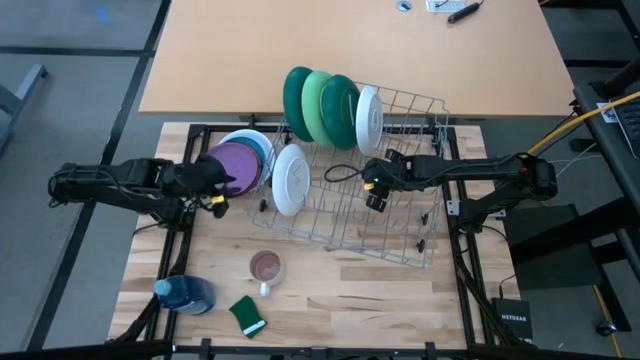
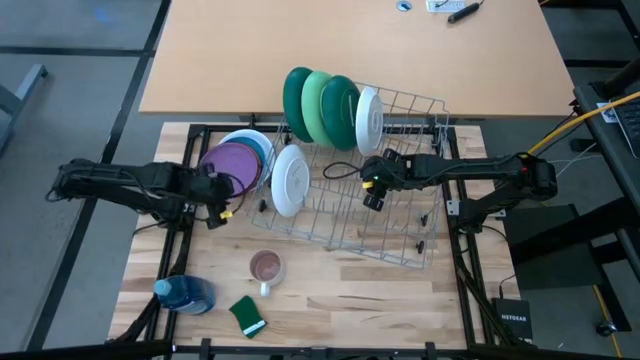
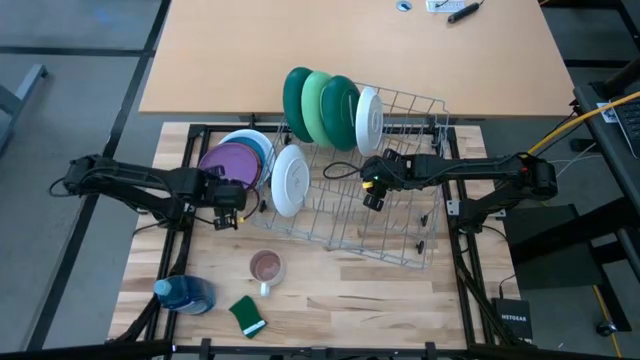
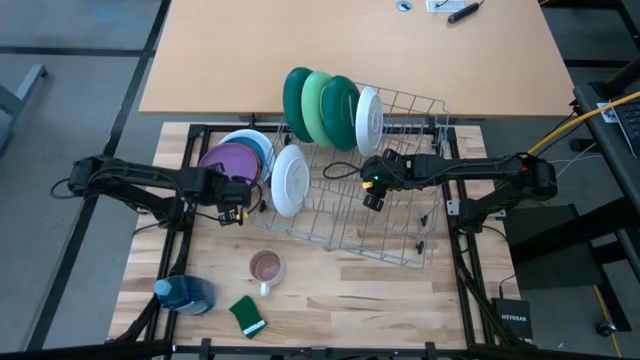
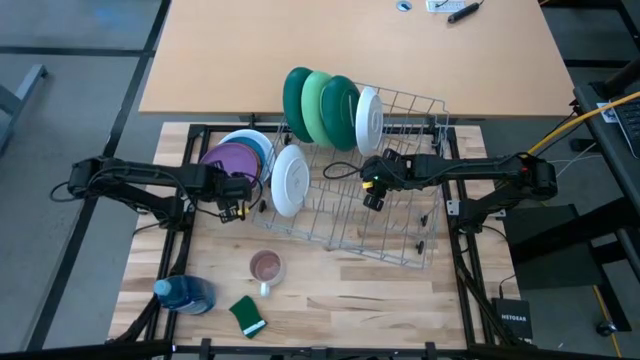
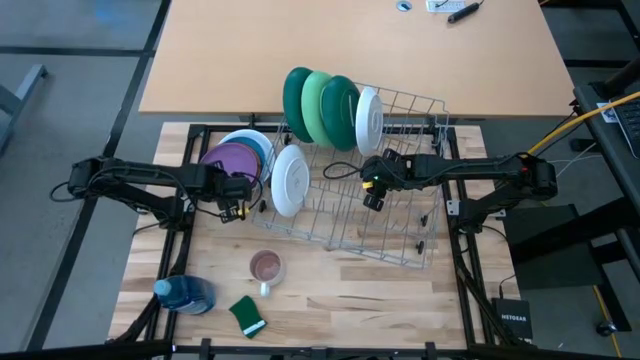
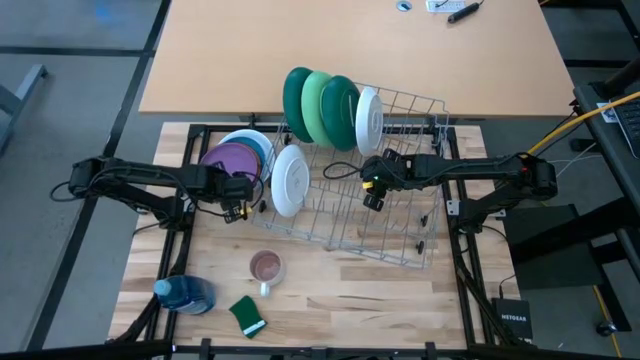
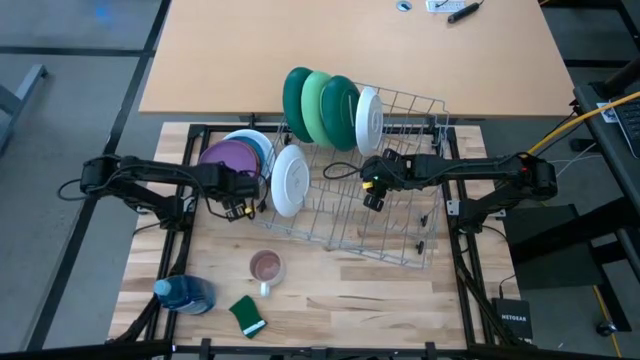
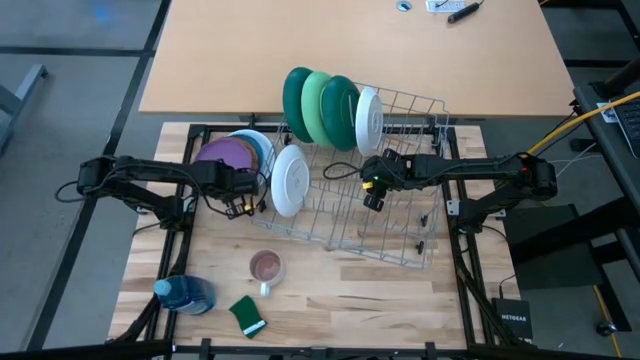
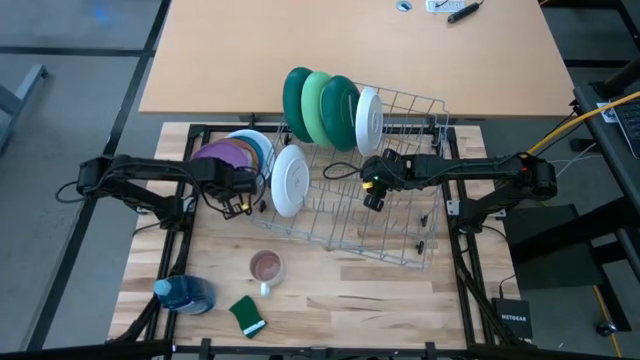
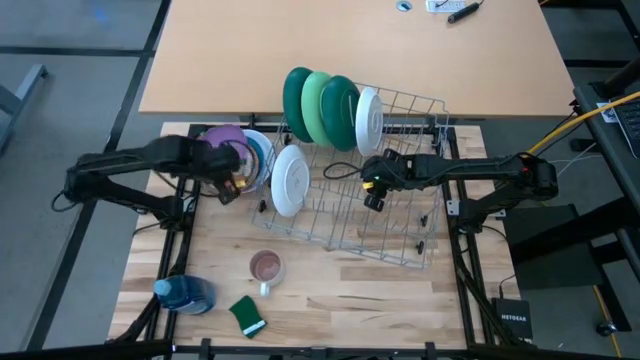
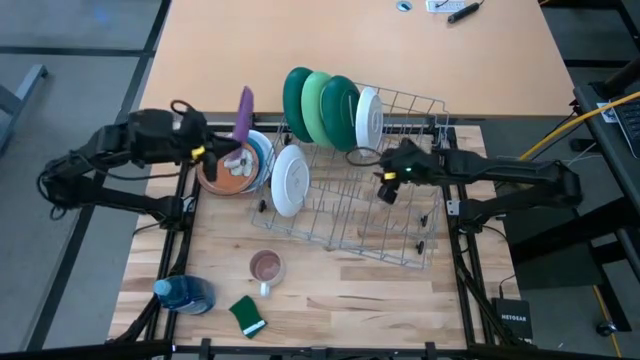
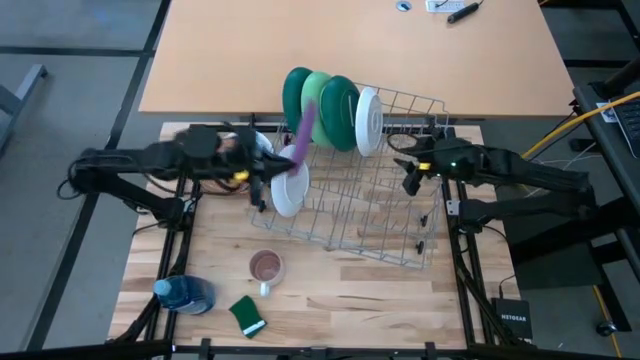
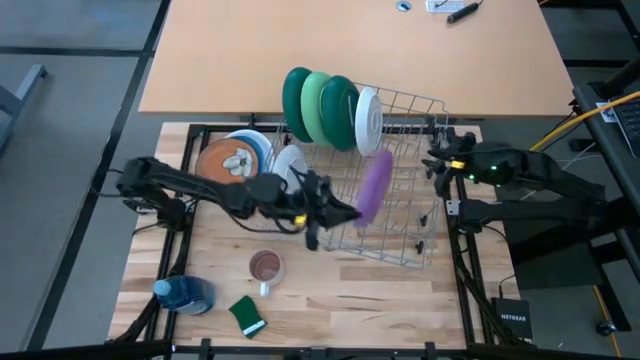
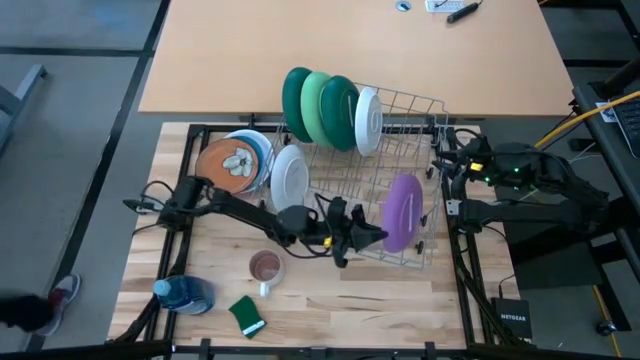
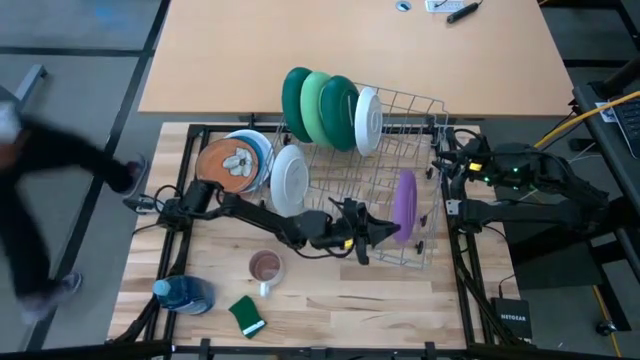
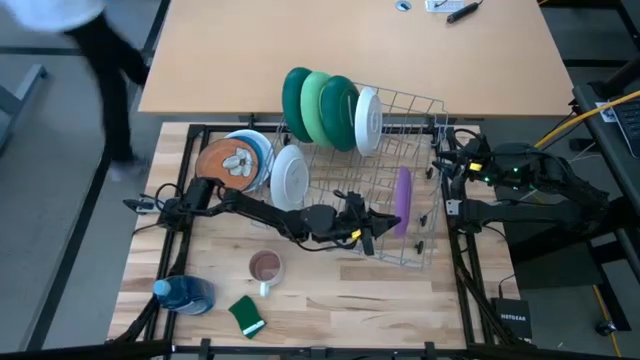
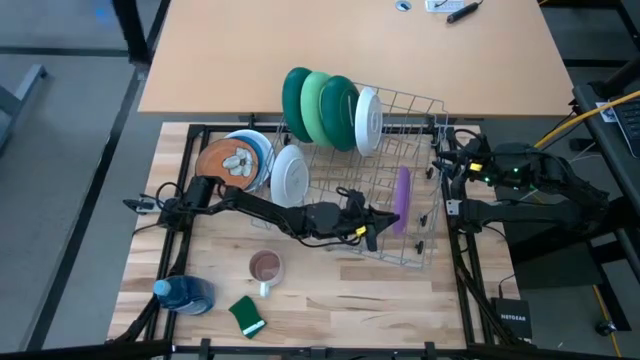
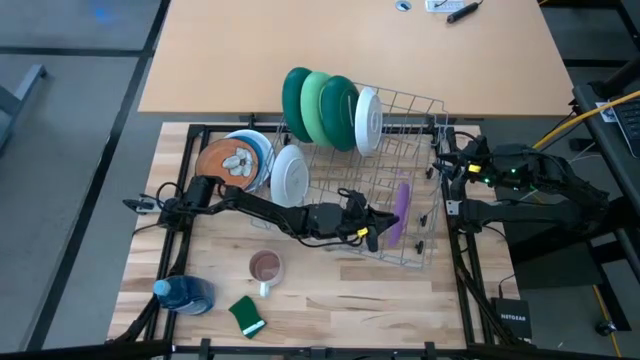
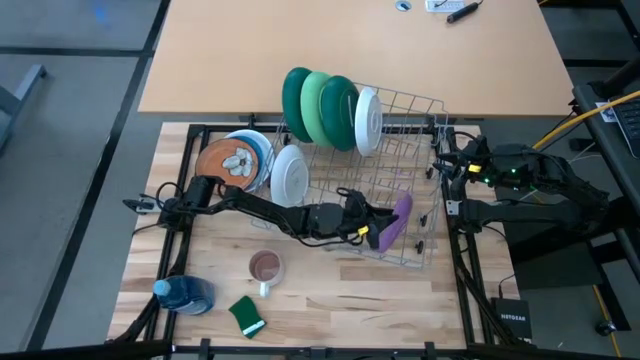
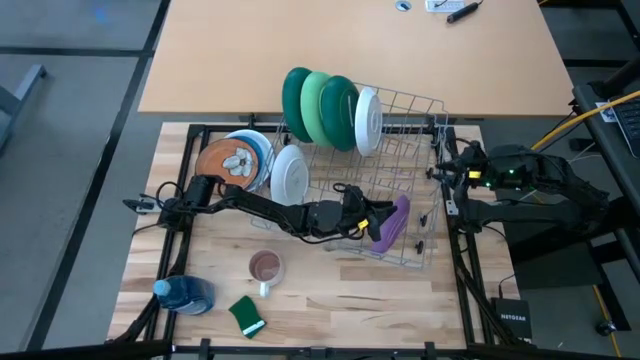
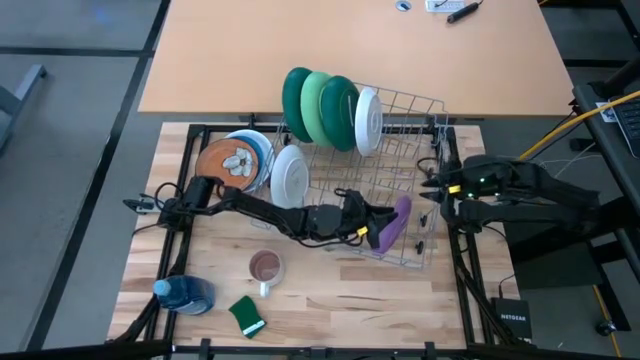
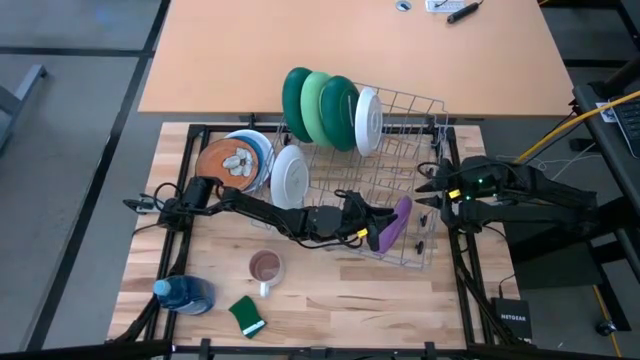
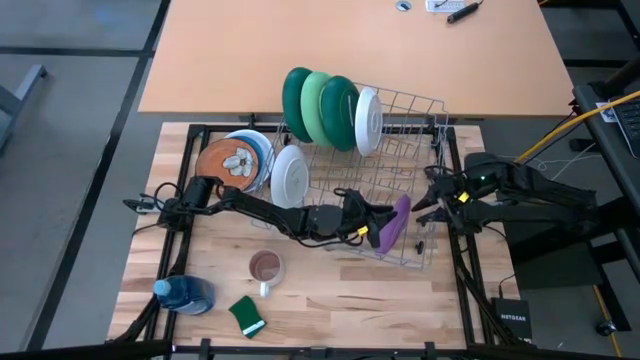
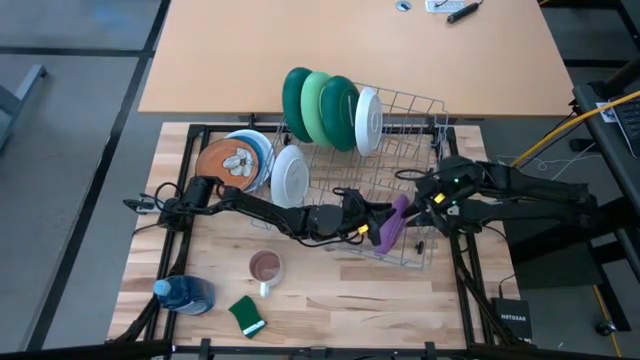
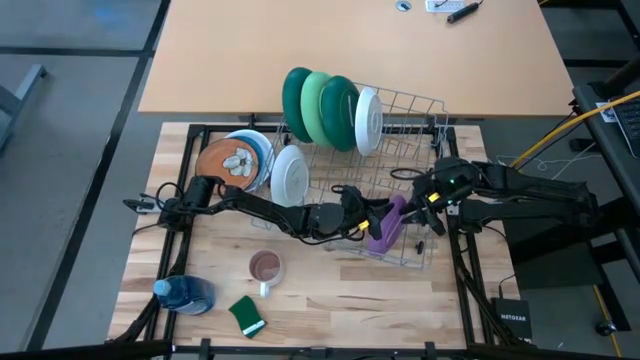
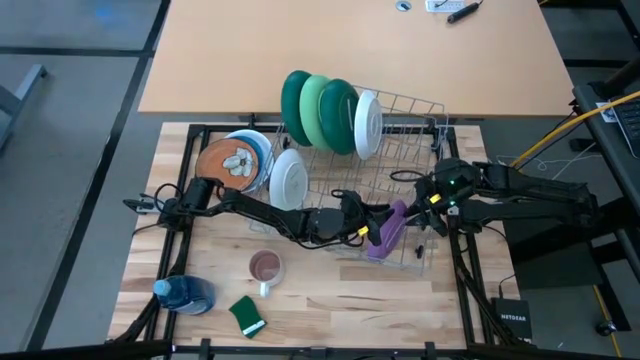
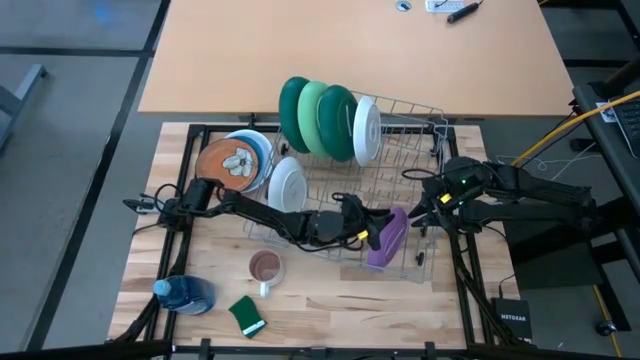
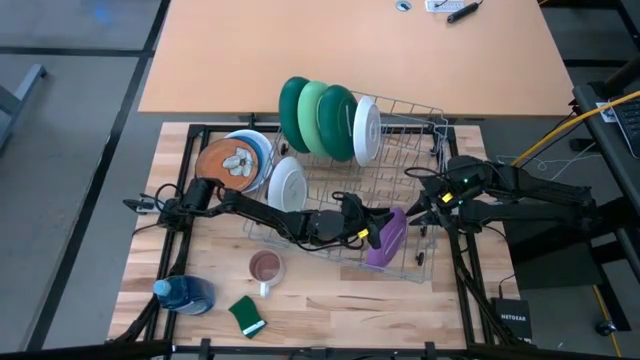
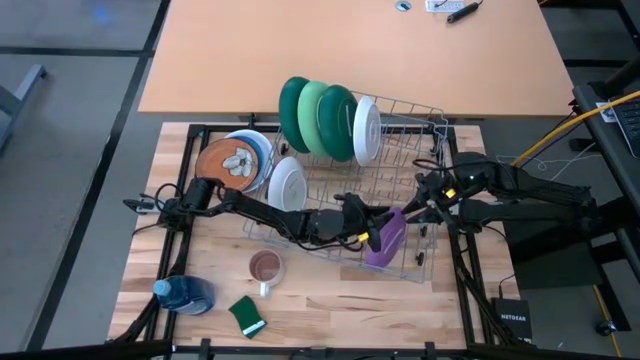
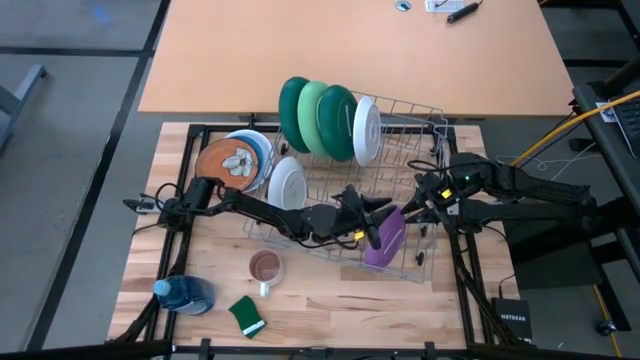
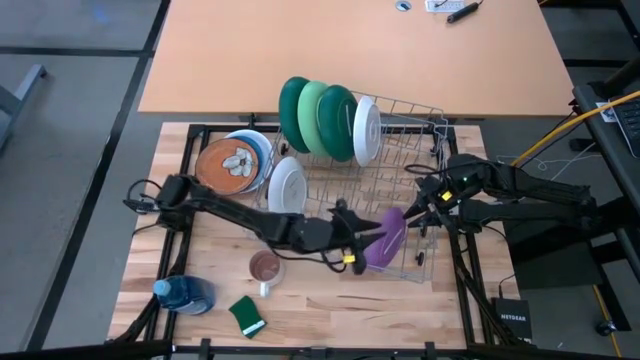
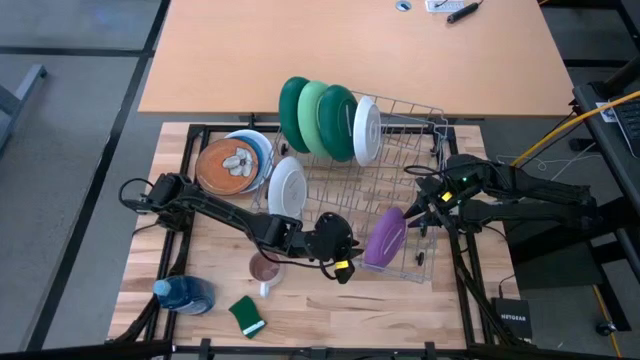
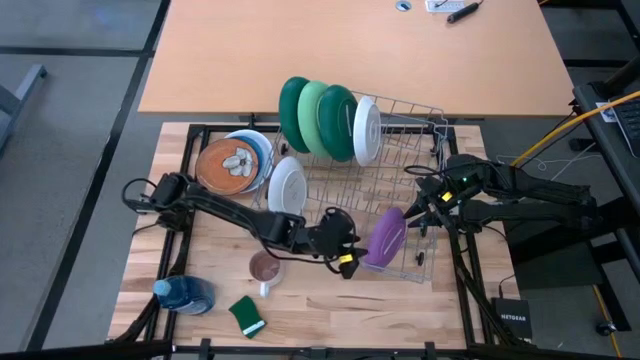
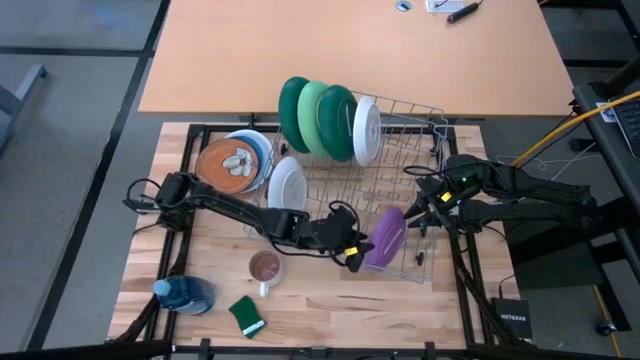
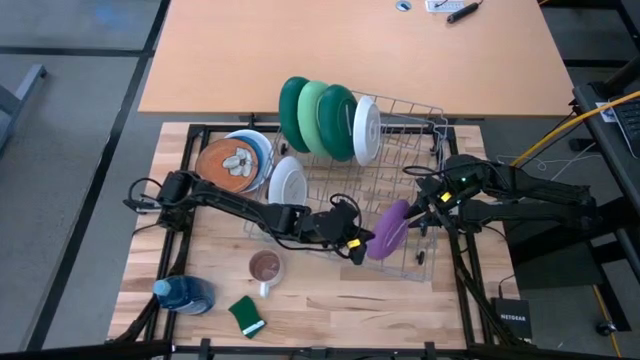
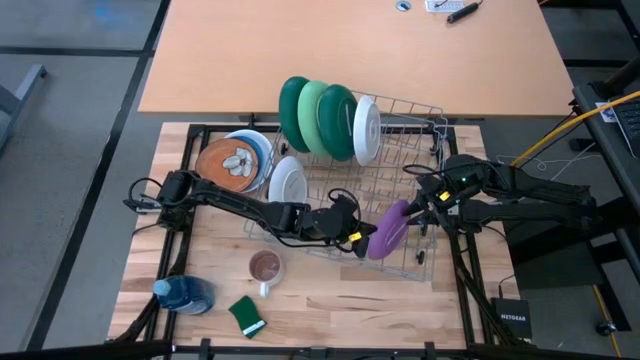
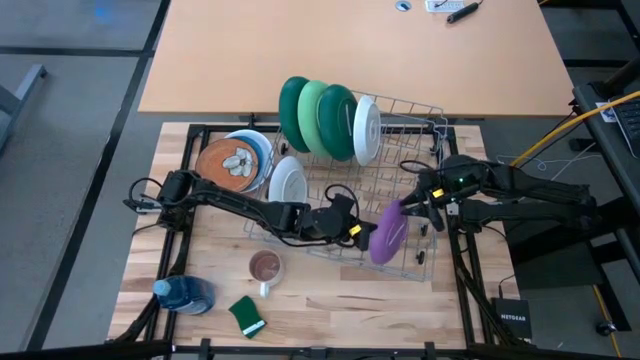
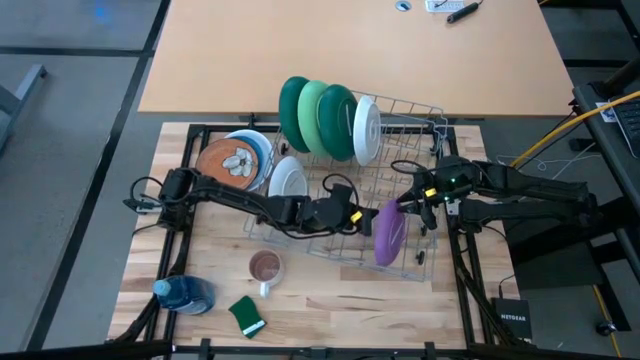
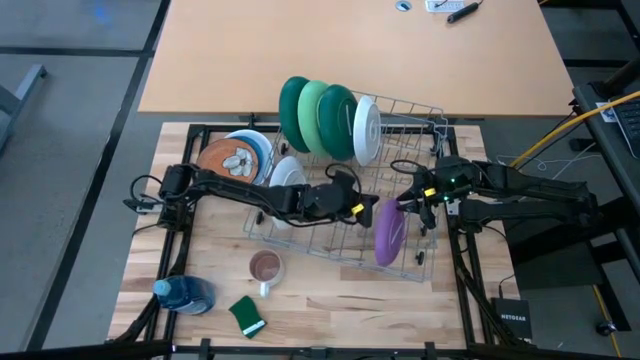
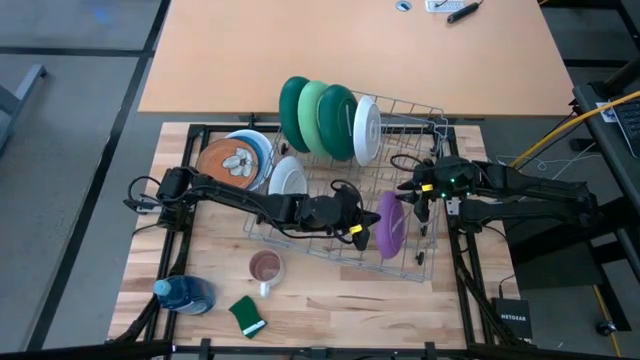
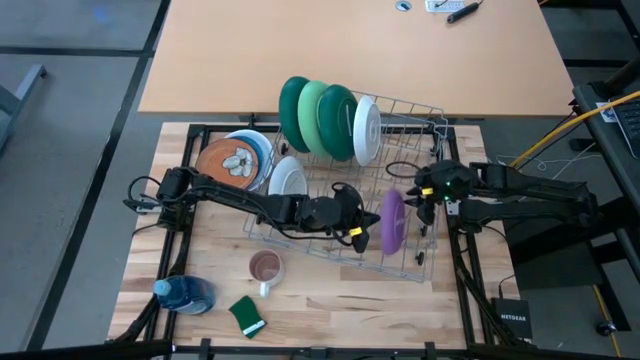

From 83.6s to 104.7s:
Task: Sort dishes
Put the purple plate into the dishwasher rack
